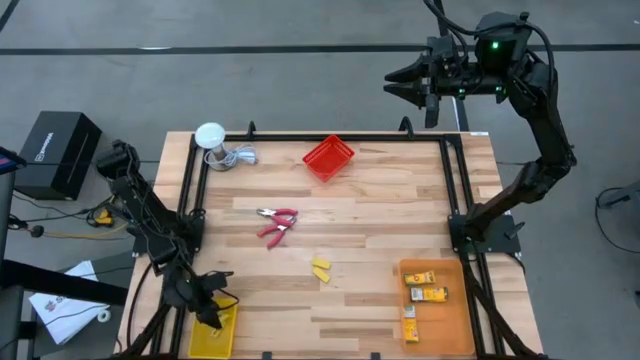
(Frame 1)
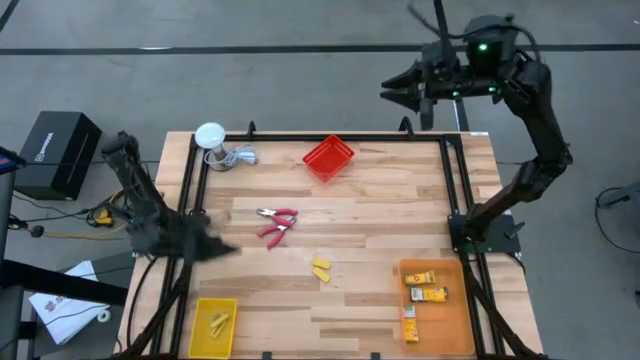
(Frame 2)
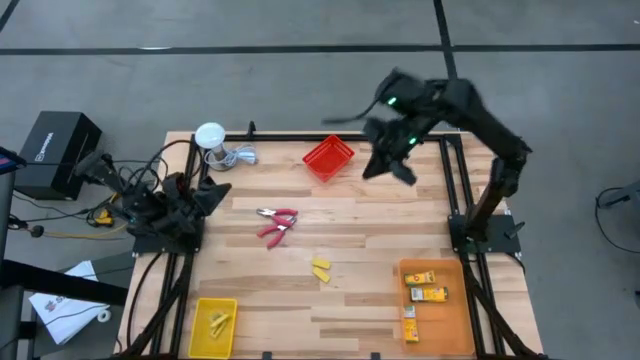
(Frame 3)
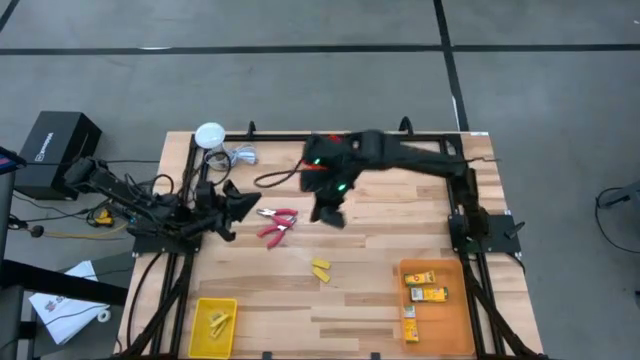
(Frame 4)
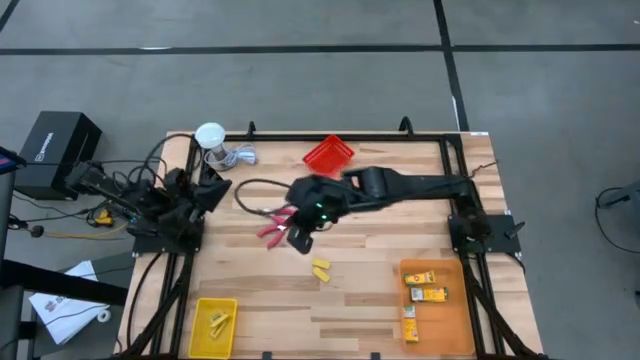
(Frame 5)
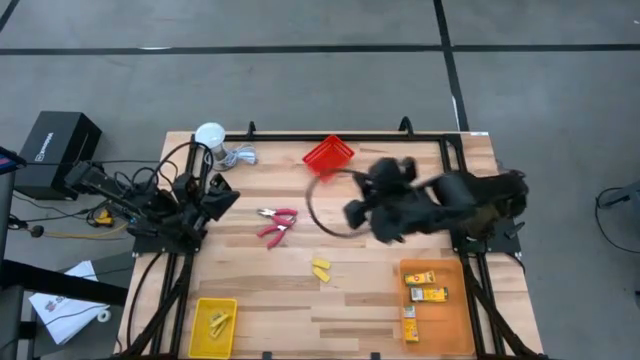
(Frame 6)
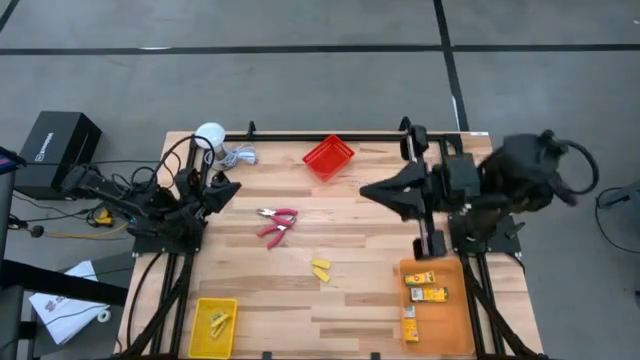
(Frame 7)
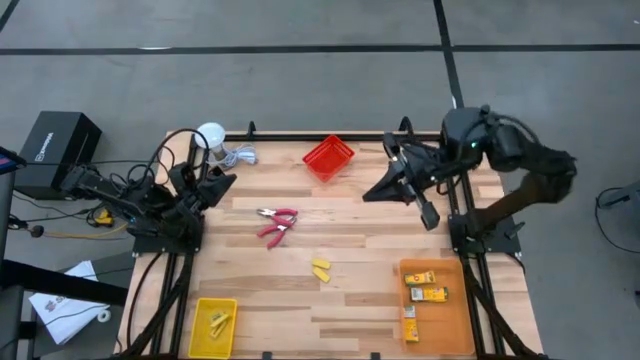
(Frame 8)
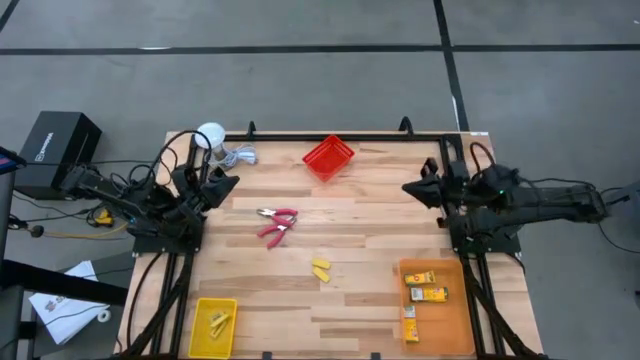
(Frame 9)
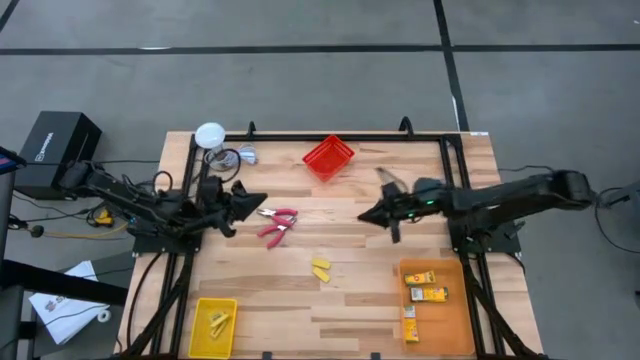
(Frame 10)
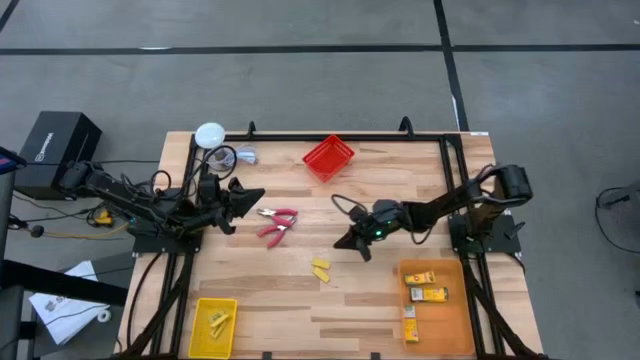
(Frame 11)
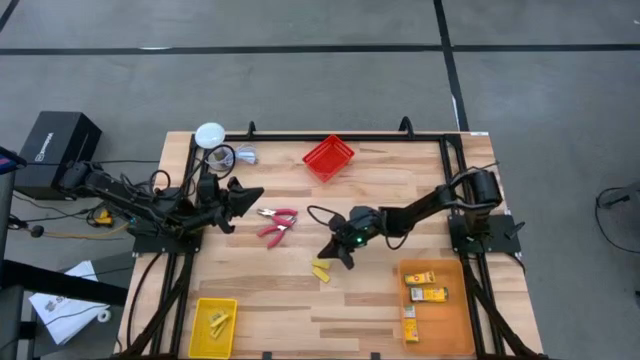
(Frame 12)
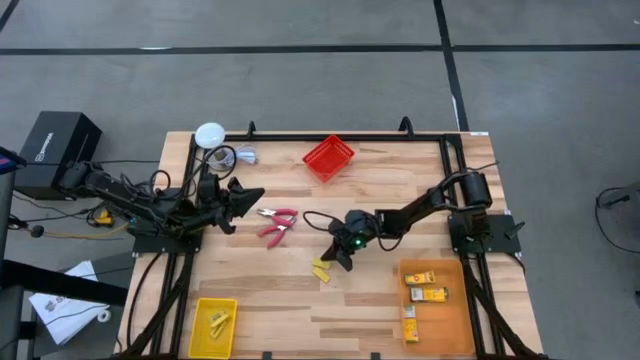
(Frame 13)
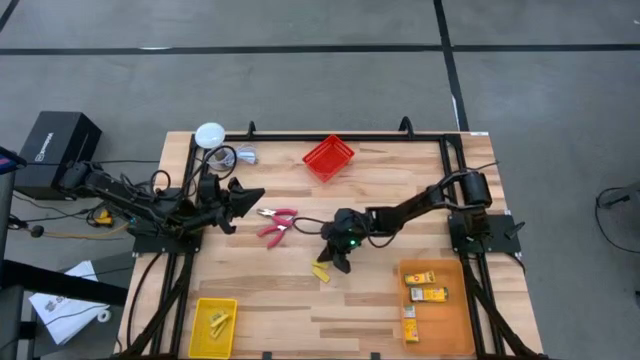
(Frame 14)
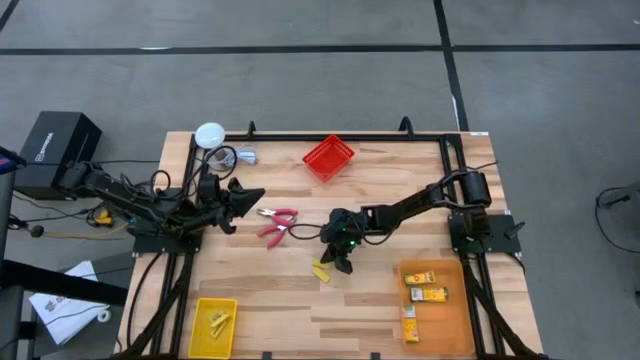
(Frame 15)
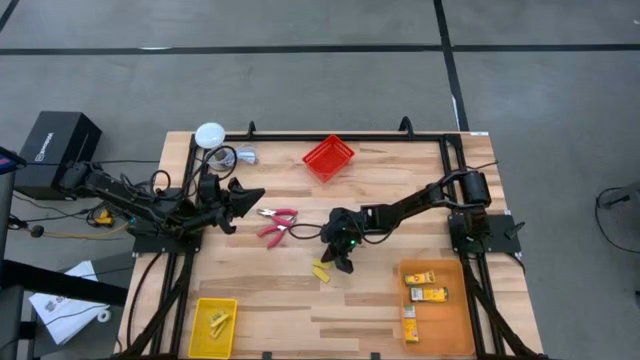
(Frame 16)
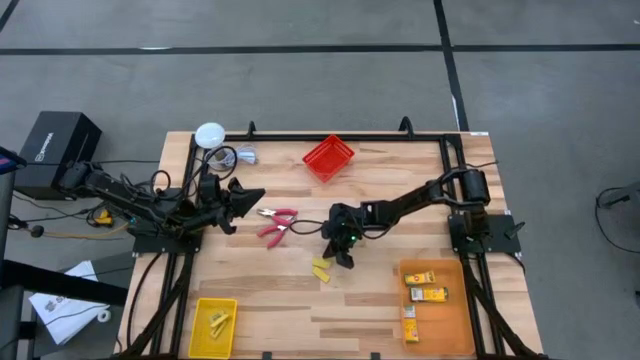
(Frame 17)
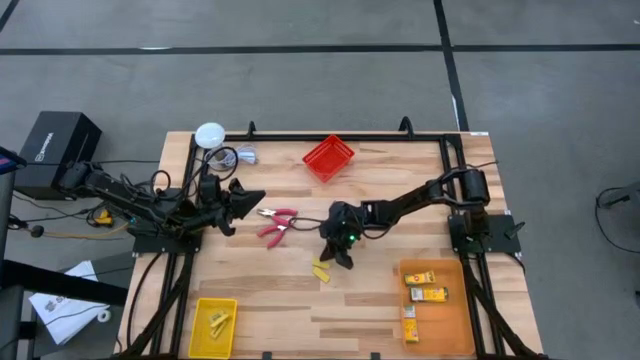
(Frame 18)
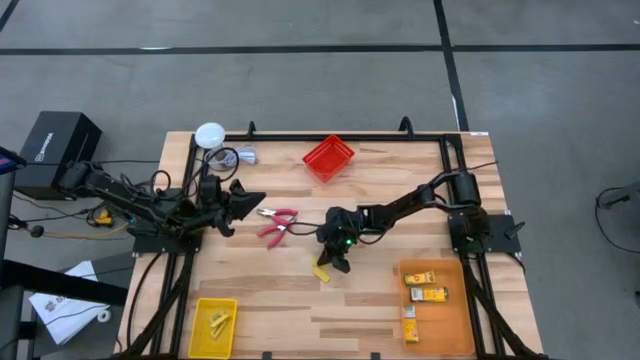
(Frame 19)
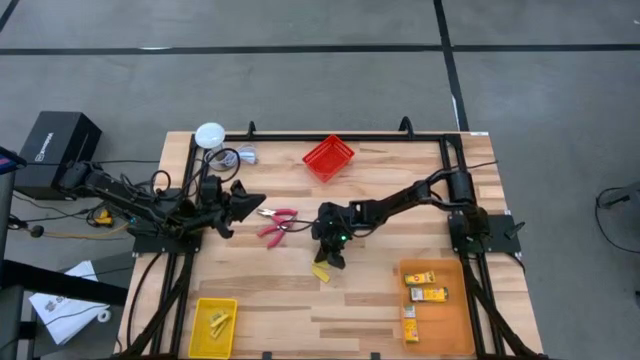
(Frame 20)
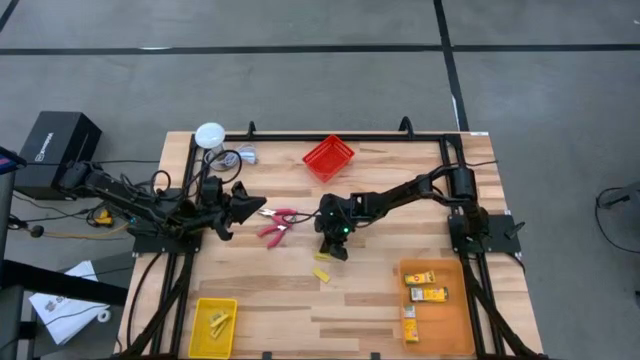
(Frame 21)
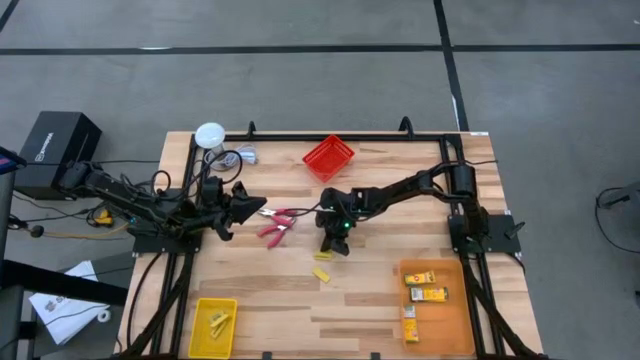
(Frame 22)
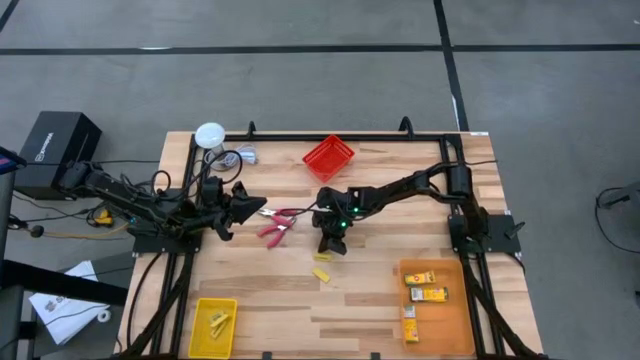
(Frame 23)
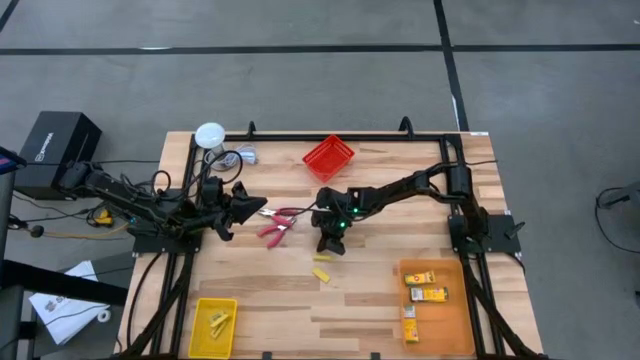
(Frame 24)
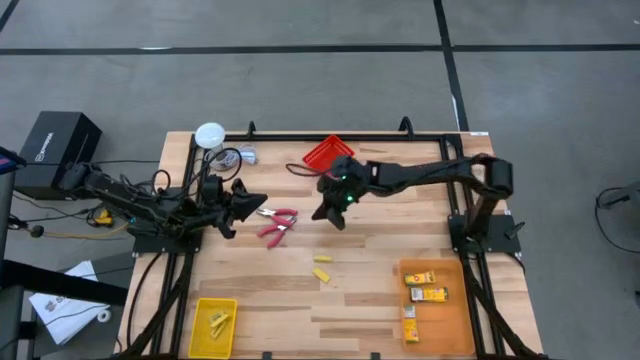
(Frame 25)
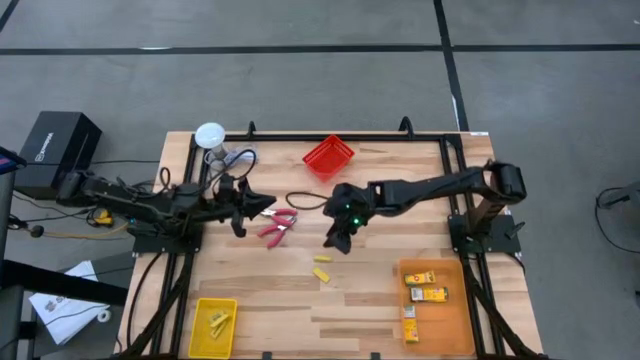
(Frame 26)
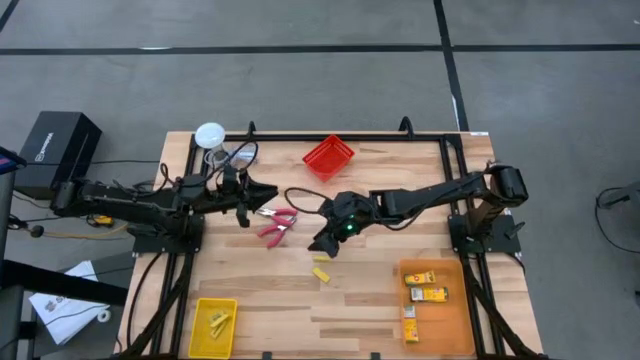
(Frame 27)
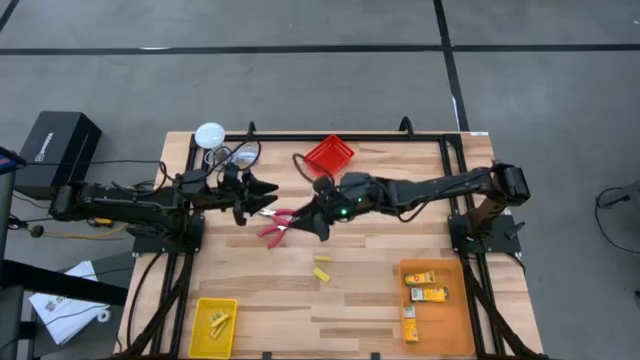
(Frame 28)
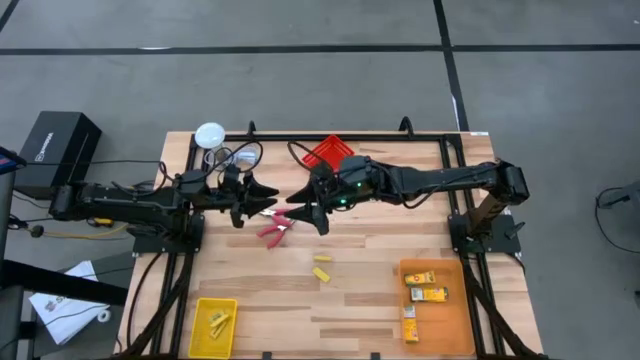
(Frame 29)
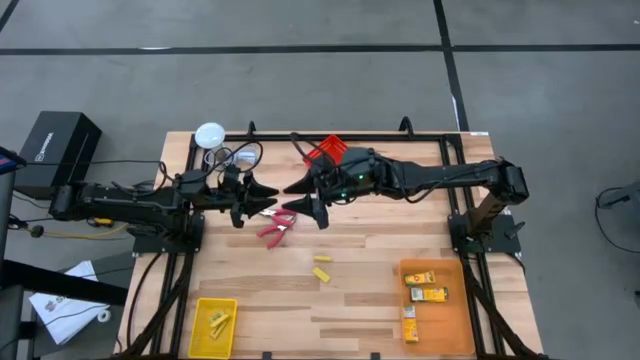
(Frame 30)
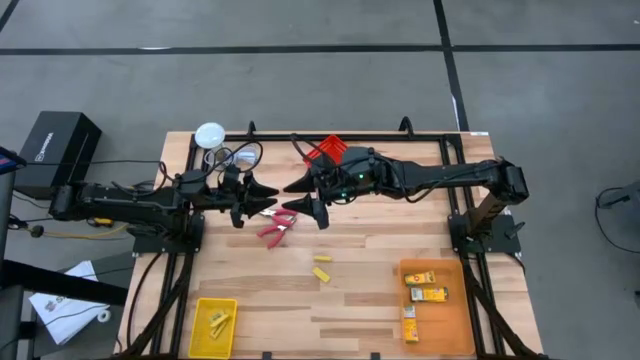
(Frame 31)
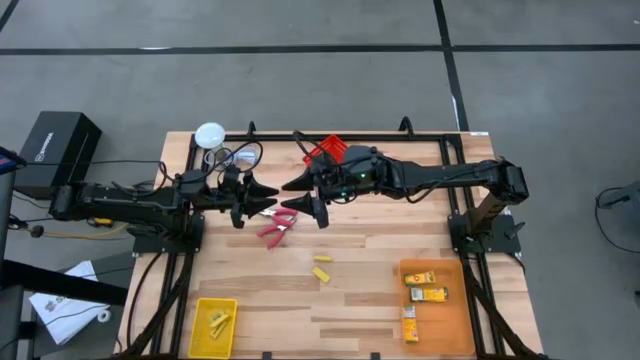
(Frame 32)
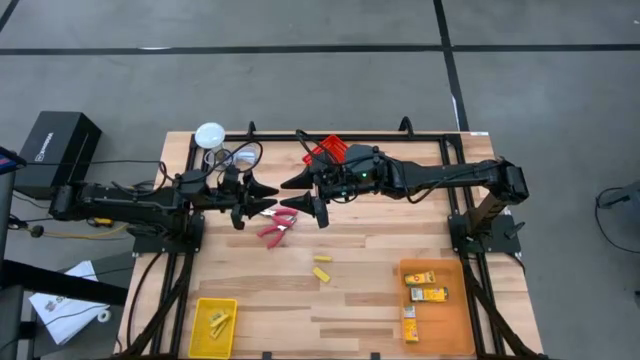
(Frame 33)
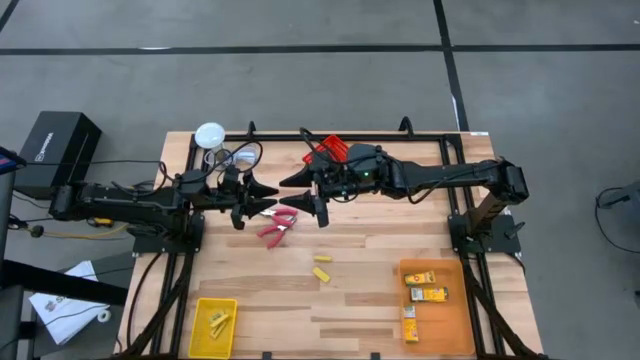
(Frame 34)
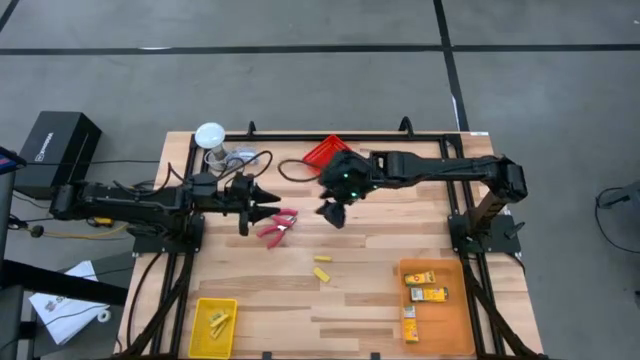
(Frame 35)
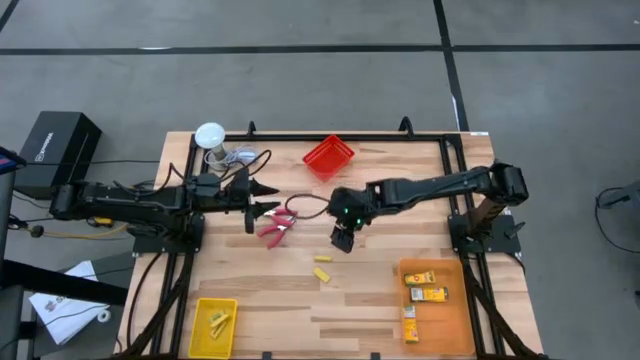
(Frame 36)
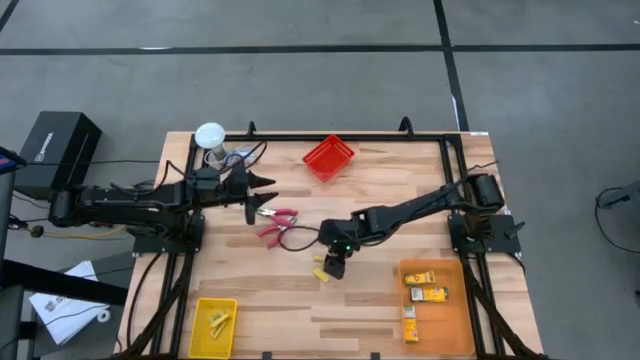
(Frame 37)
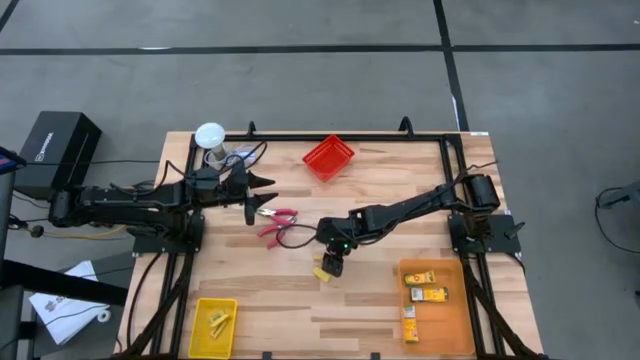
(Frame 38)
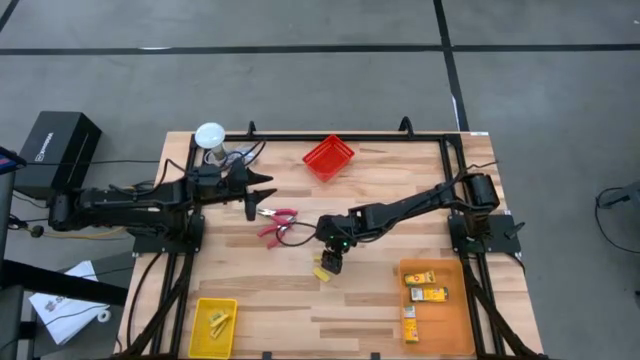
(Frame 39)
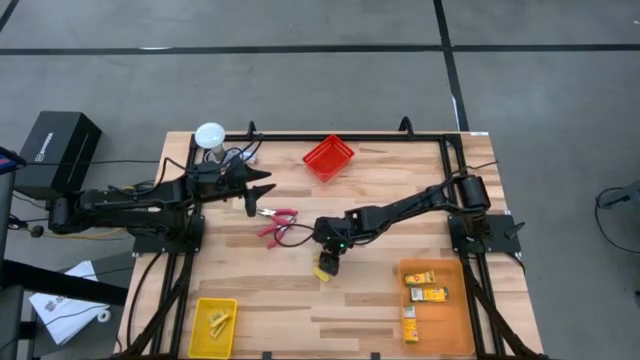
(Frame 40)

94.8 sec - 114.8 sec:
Task: Pick & Place School Supplies
Put the yellow eraser into the yellow bin

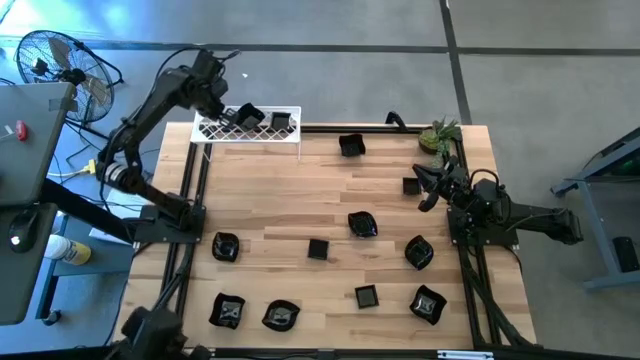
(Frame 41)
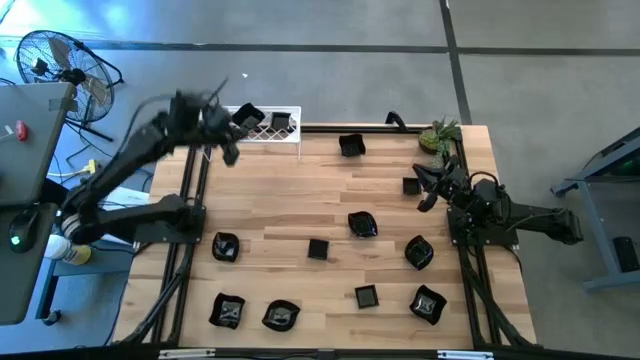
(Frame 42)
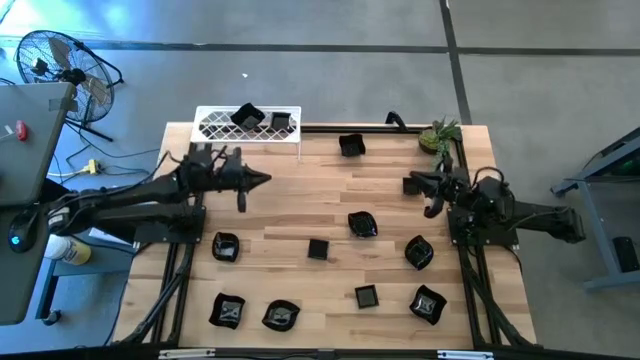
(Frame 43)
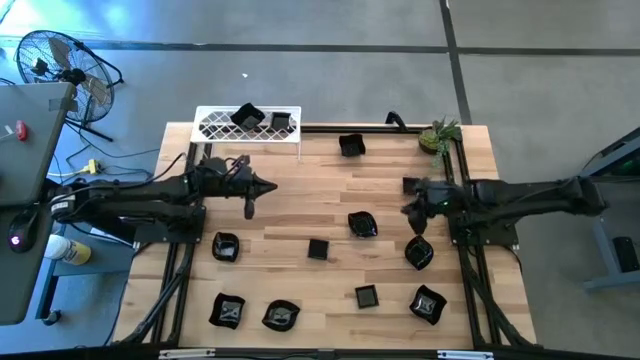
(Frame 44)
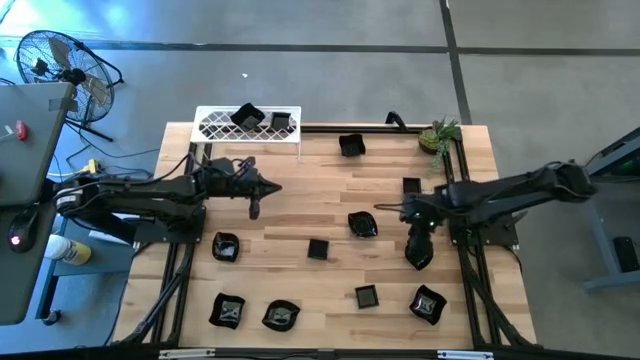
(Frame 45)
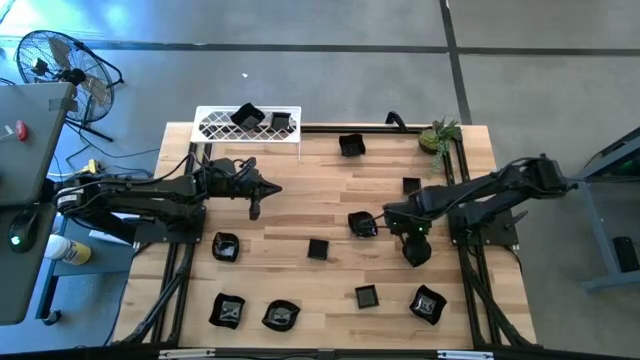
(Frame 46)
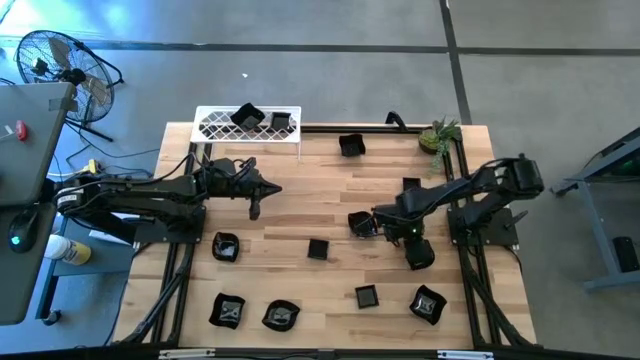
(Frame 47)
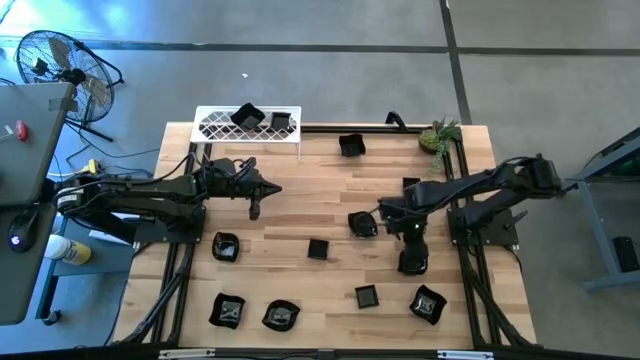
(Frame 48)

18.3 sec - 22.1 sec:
Task: Pick & Place Mini shaped plates
Put the black leaf-shaped plate on the shelf
